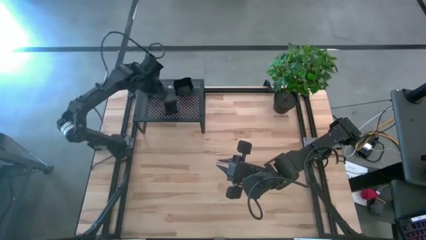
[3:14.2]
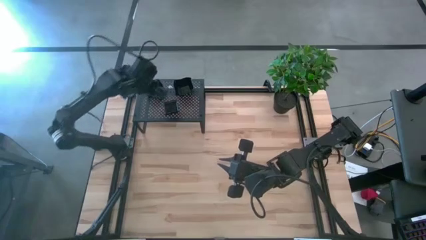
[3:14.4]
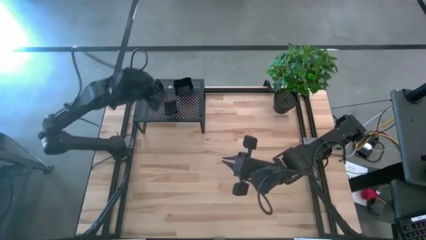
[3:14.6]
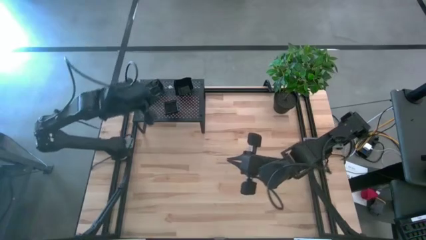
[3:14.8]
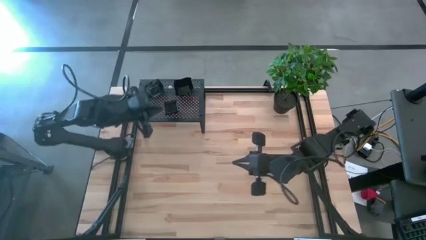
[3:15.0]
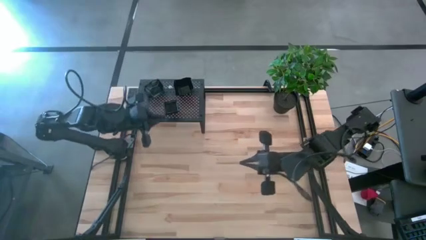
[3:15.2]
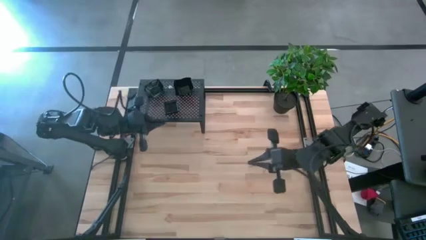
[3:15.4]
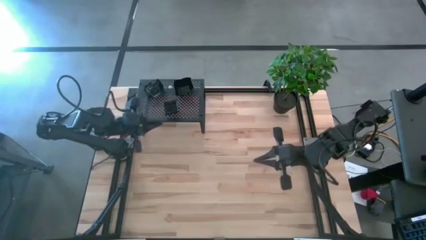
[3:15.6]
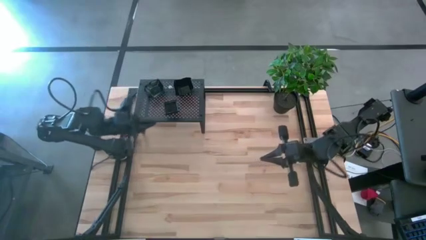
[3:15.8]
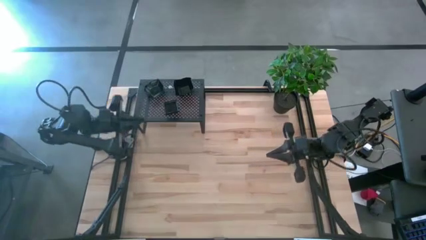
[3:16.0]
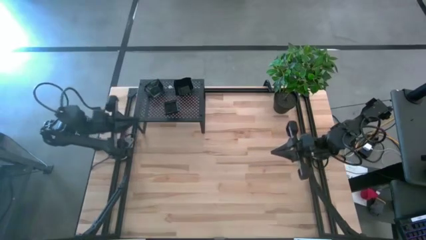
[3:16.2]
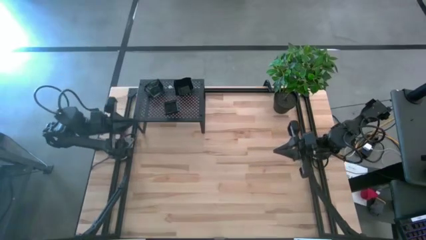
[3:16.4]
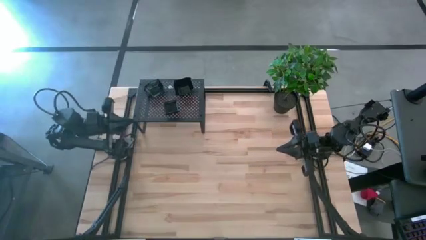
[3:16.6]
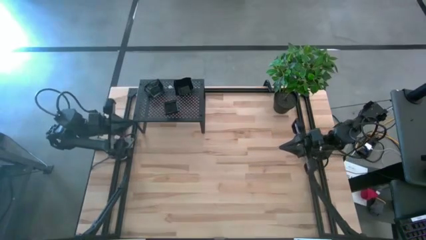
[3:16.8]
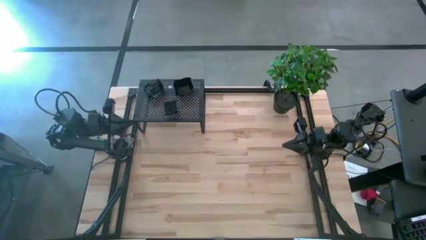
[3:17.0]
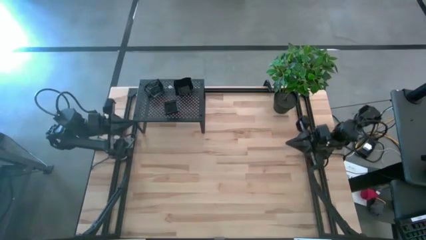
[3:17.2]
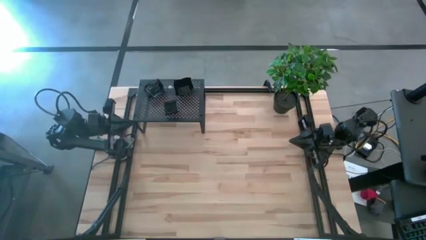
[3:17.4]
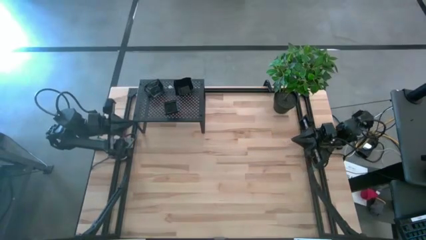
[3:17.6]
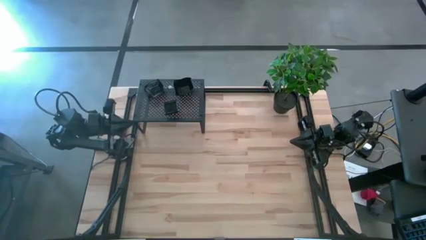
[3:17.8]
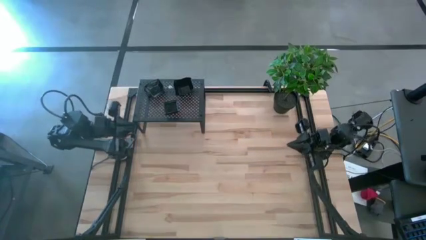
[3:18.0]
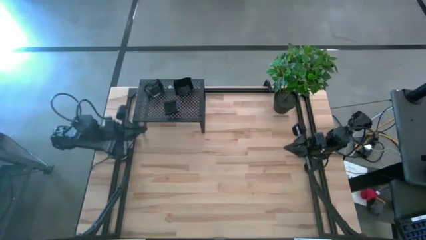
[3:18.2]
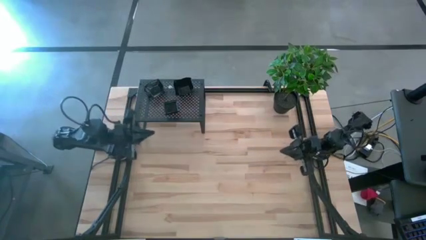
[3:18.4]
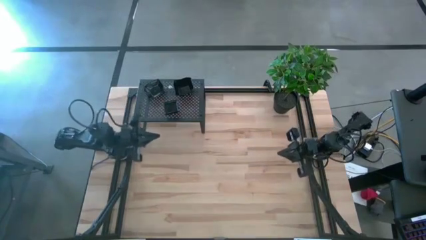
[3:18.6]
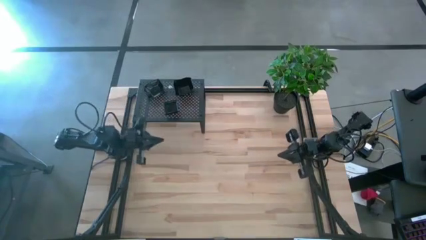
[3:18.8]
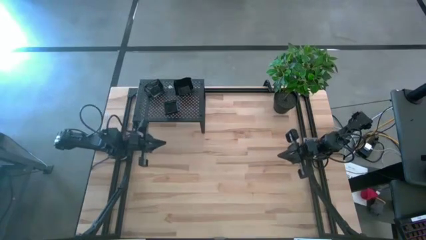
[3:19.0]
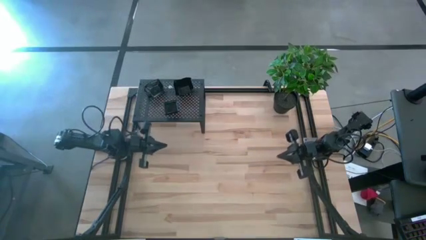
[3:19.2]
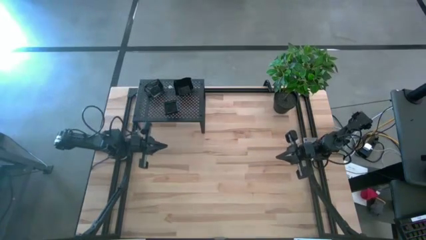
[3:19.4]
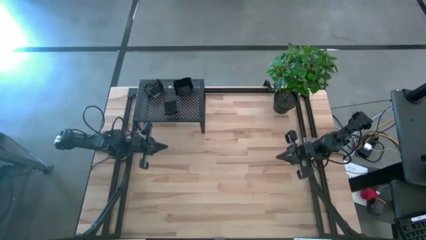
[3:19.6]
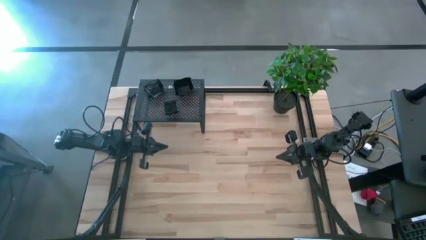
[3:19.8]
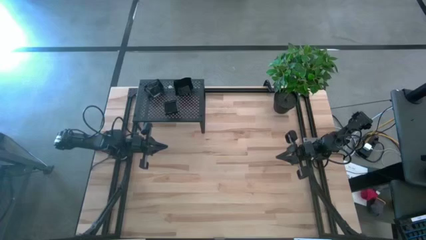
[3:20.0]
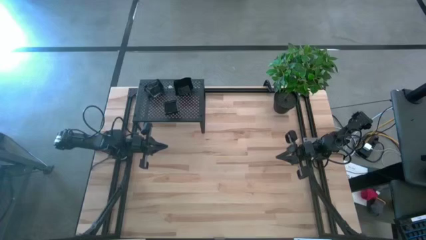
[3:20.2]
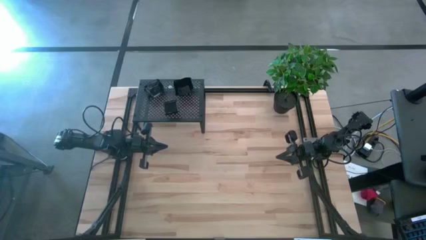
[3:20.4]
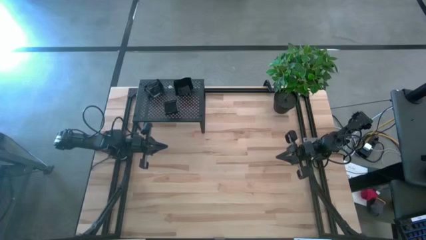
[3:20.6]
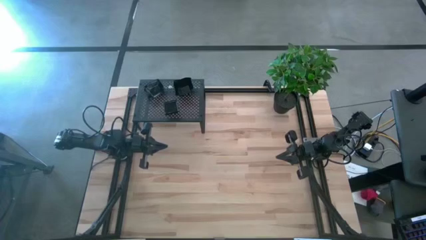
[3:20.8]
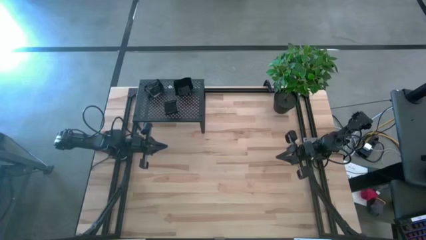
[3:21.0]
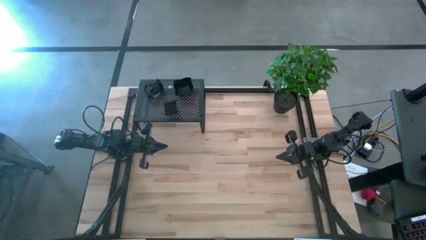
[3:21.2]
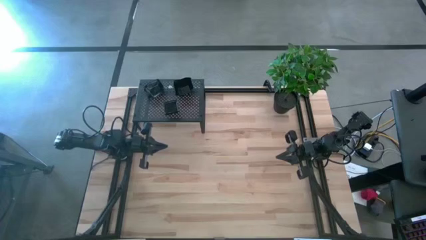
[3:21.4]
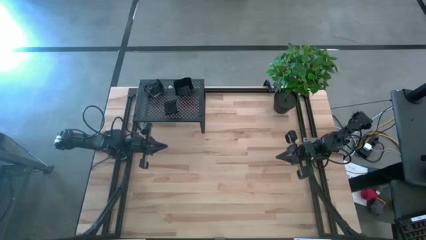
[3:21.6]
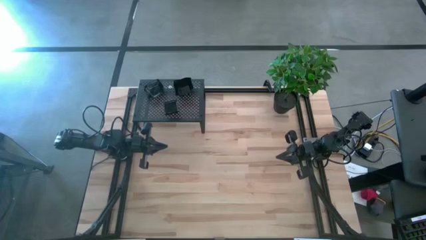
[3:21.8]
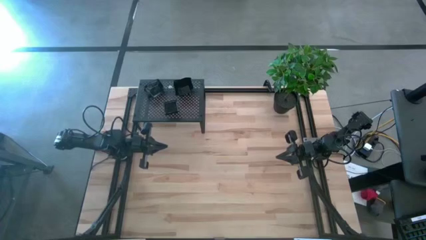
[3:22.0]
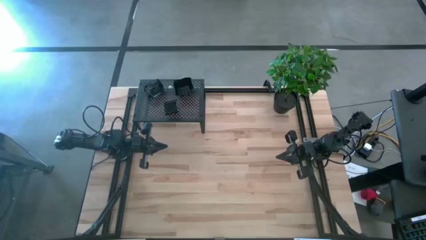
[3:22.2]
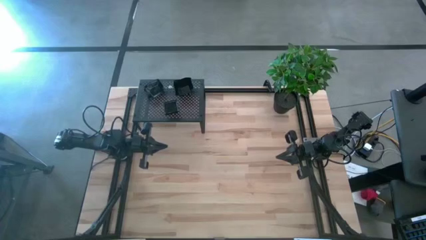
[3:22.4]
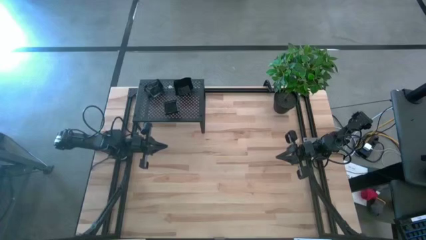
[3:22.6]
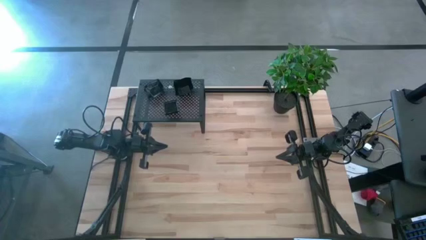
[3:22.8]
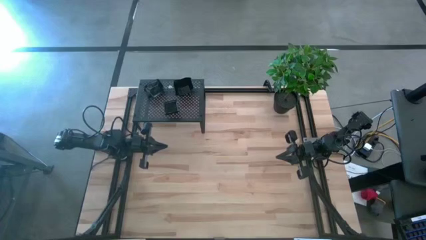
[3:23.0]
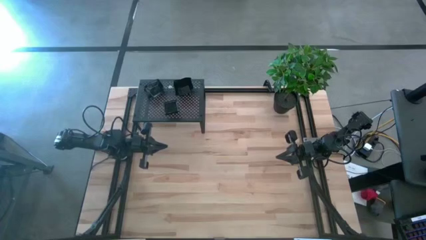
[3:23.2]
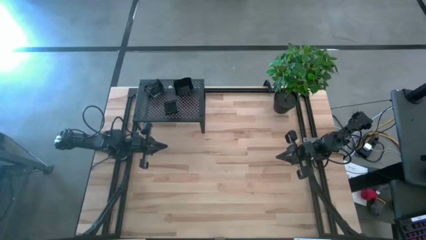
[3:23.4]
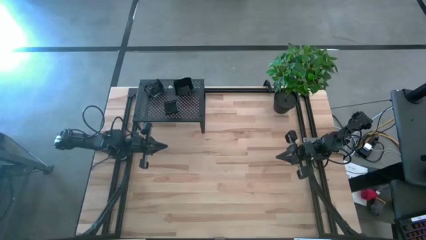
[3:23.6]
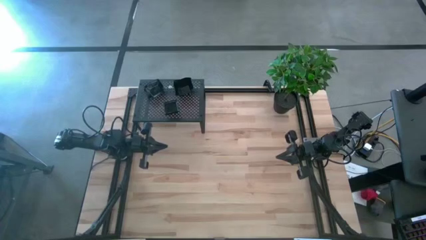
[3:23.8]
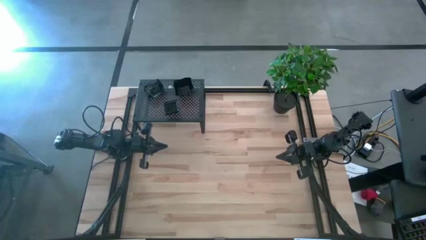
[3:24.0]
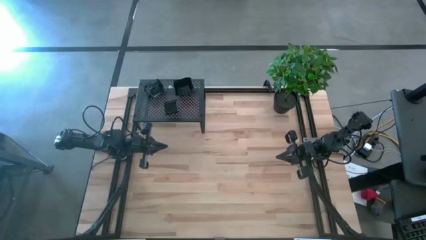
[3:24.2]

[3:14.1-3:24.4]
Task: Pick & Place Mini shaped plates
Return to Home Position

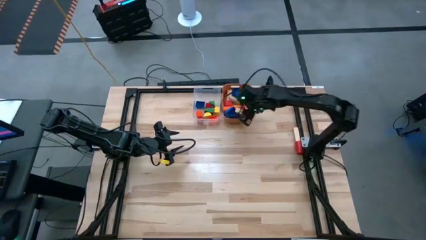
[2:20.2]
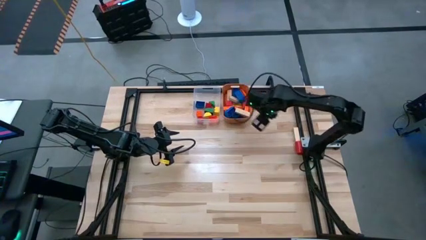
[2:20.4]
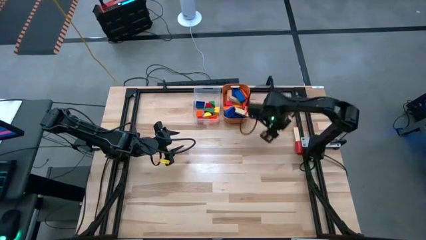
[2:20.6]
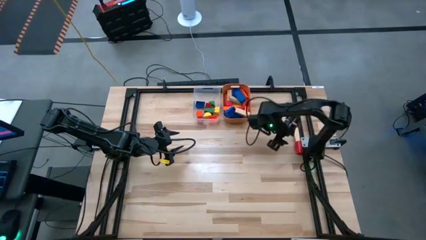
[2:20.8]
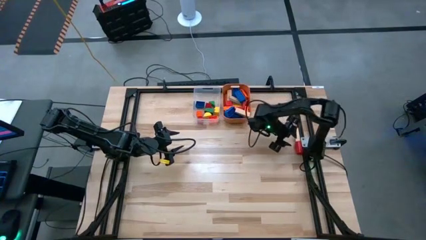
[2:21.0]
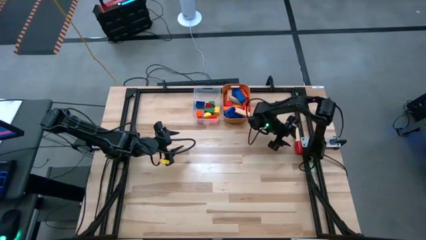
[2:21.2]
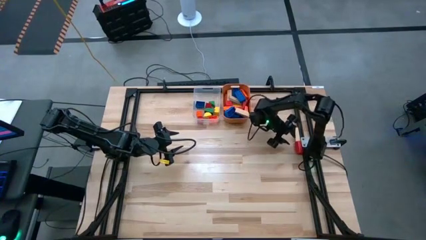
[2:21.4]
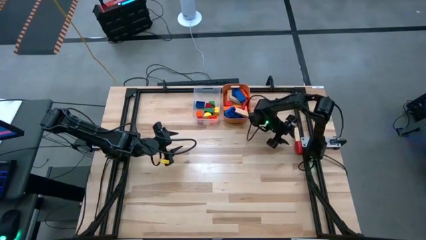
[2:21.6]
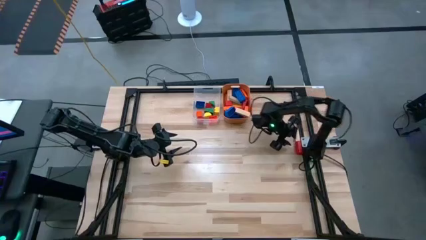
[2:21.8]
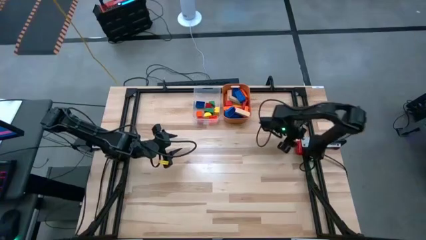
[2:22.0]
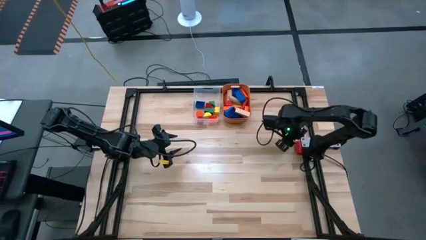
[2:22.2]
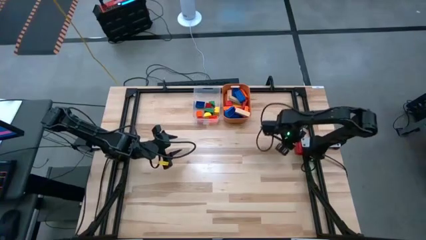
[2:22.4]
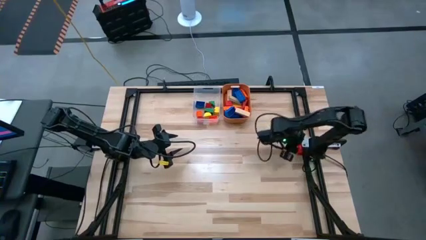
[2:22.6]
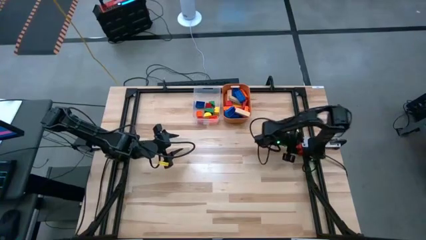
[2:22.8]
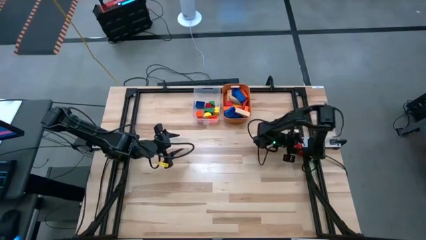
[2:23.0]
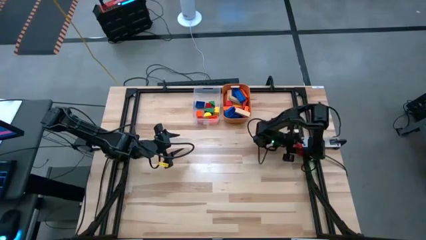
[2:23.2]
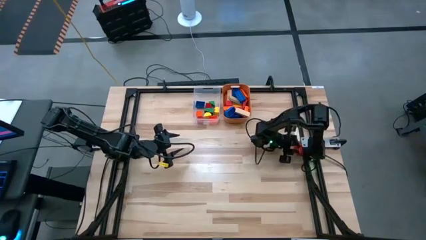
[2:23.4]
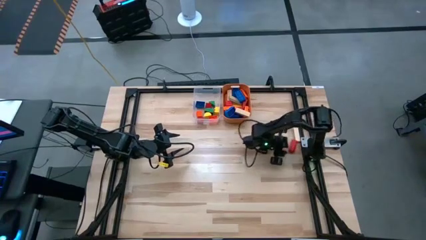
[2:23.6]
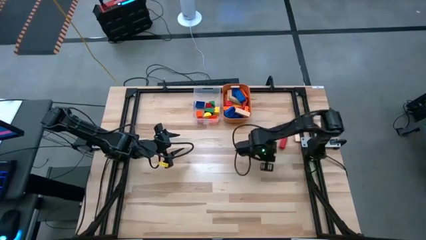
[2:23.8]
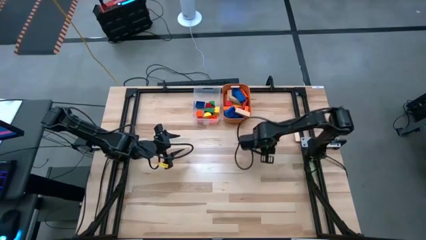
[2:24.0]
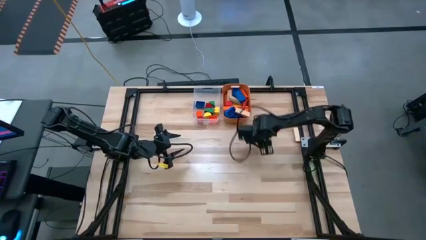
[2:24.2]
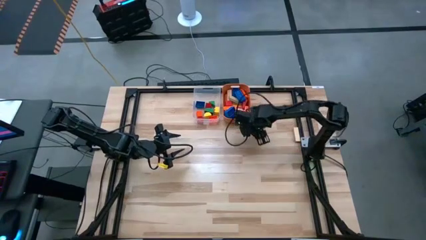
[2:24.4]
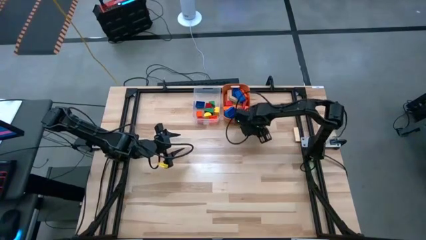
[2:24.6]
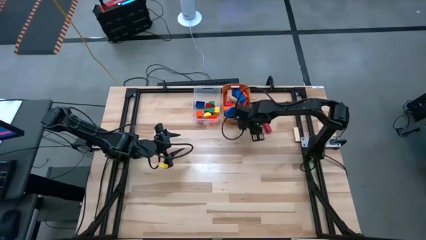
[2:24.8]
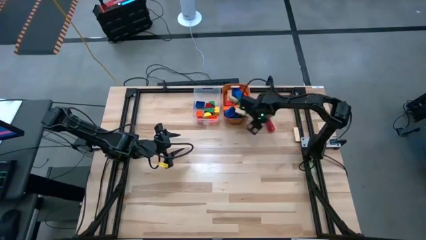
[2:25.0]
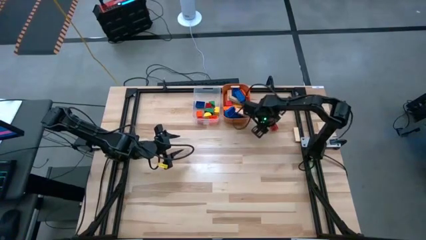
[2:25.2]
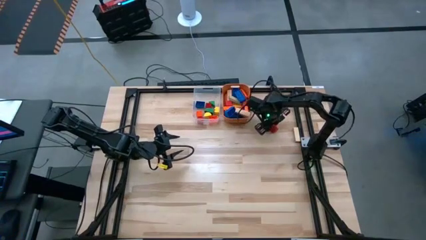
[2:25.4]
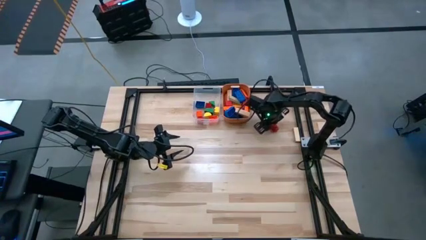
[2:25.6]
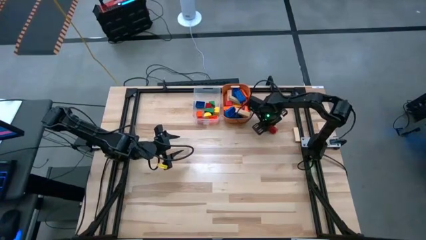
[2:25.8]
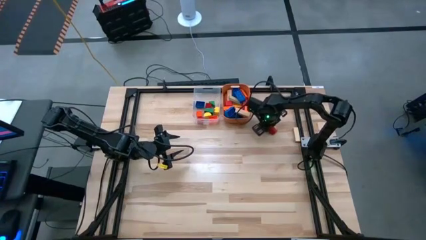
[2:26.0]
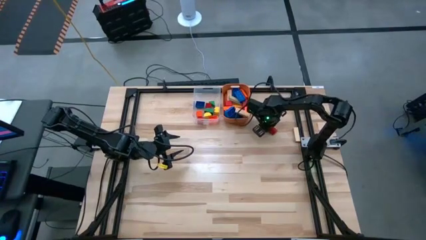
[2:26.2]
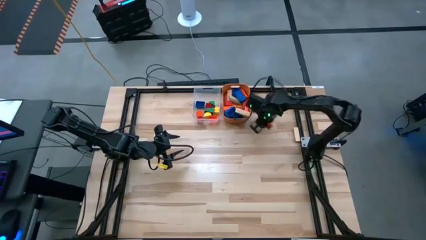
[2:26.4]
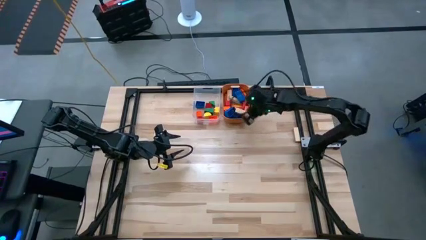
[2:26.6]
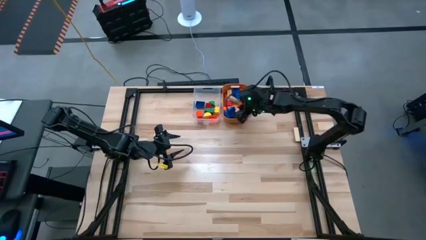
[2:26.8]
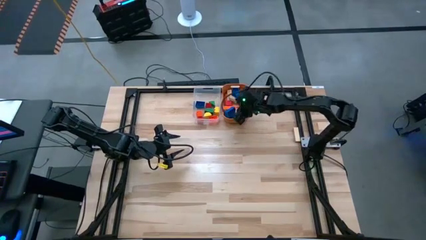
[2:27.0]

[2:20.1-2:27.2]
Task: Sort blocks by size
Put the red cylindrical block into the orange bin
